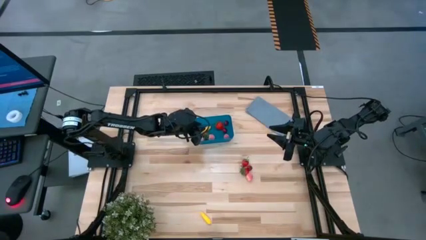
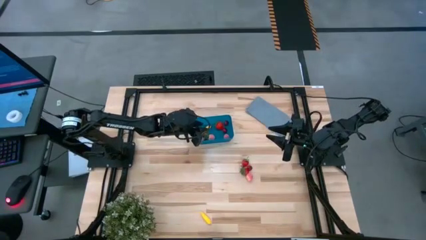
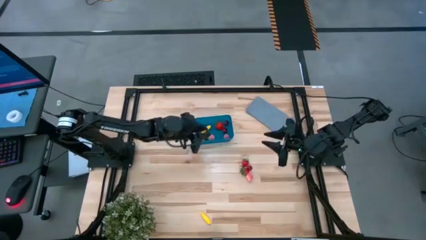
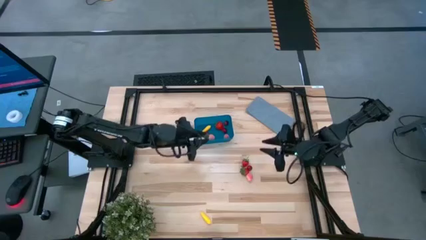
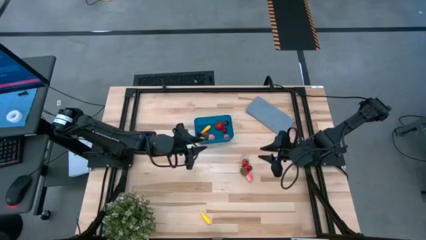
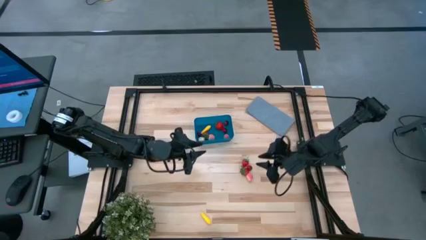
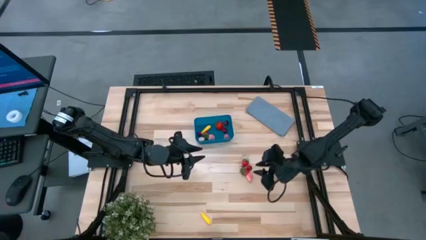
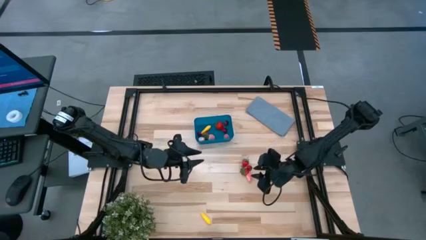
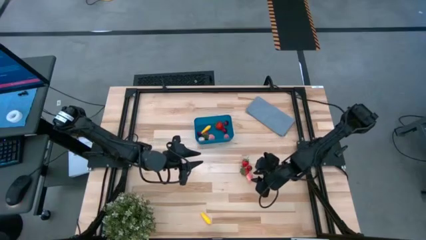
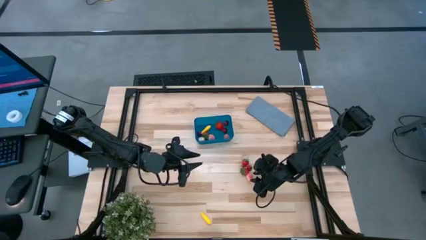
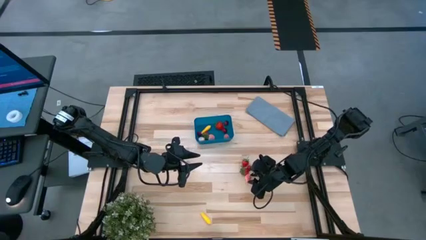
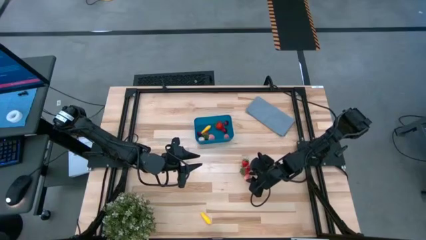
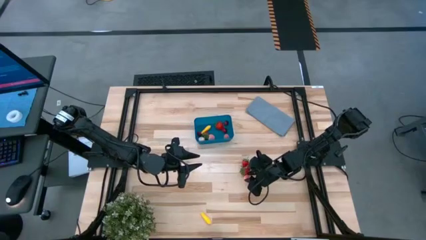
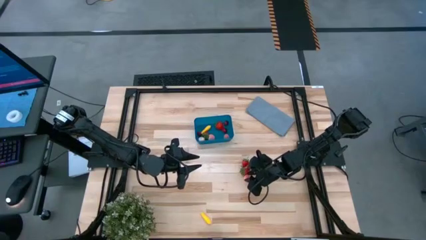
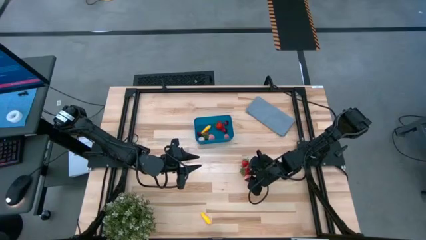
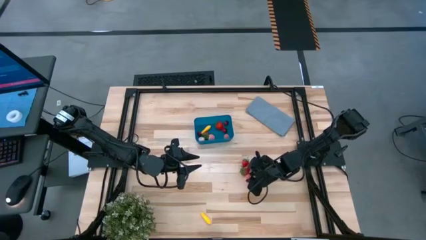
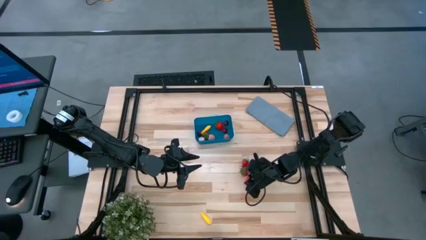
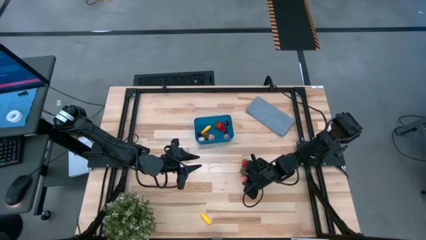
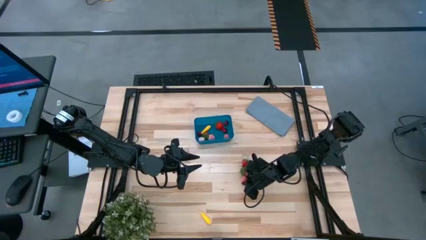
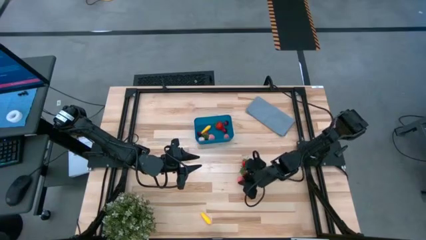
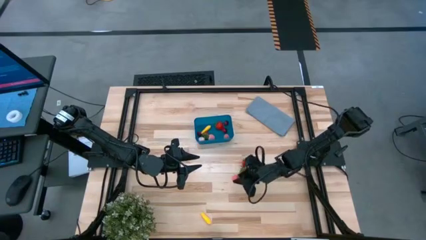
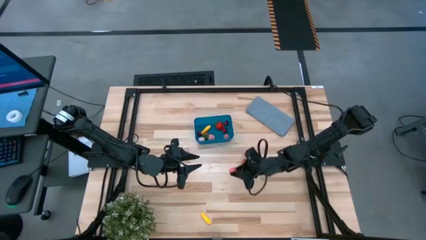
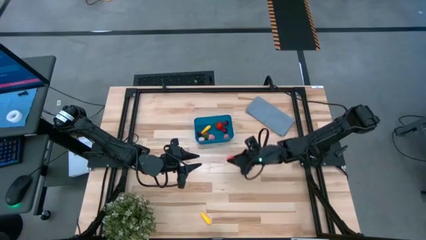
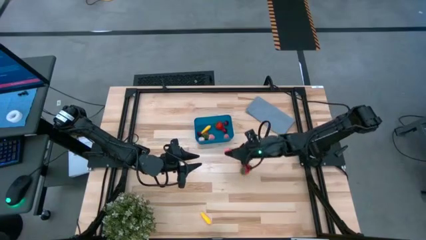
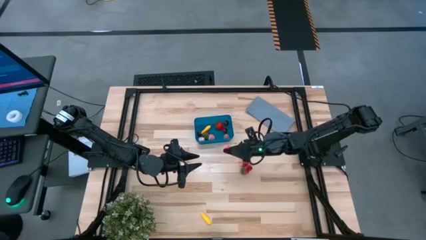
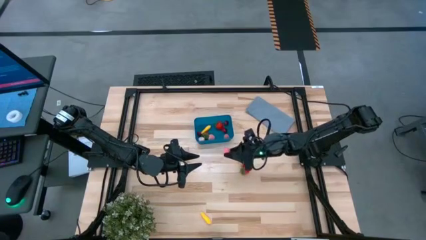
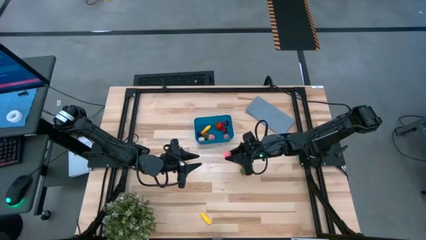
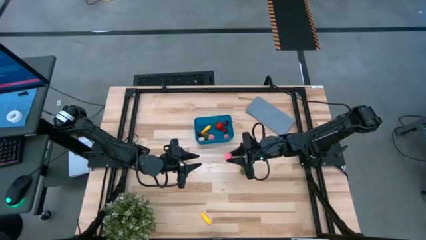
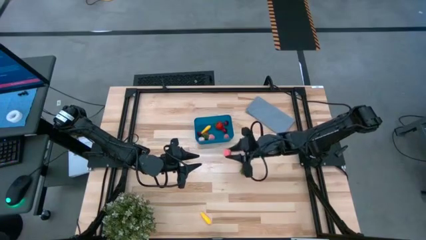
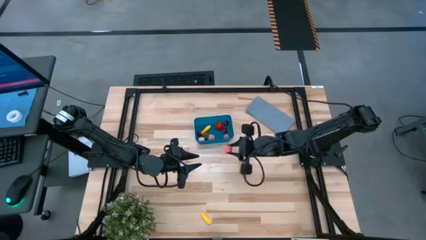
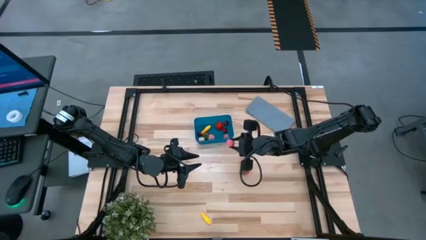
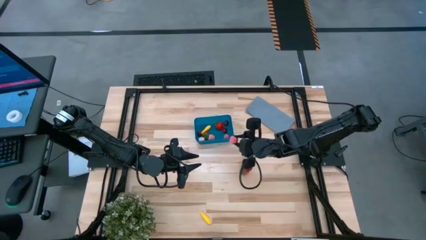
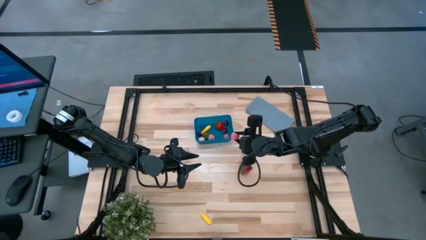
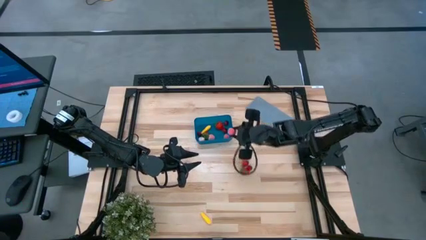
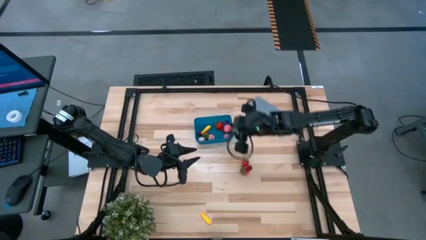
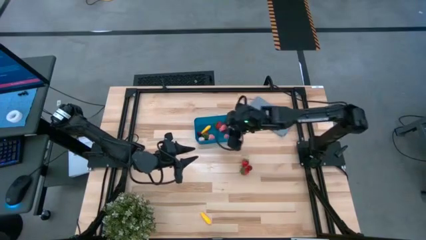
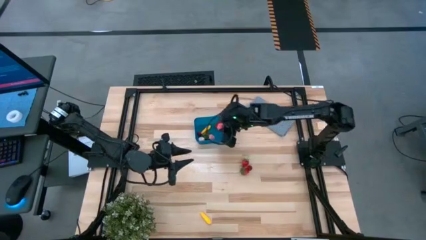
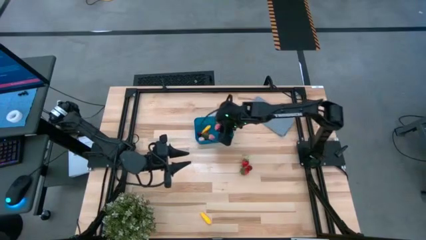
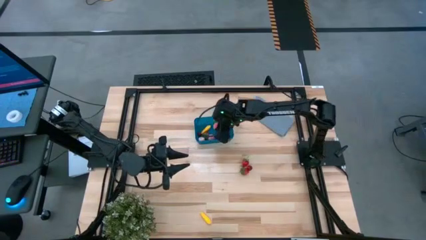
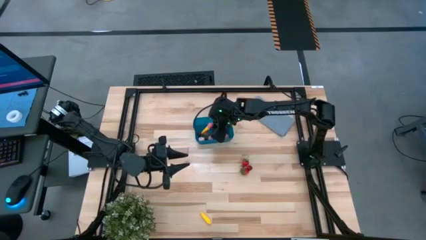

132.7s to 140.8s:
Task: Pick and placing Produce into tupperware
Put the peach into the blue bin

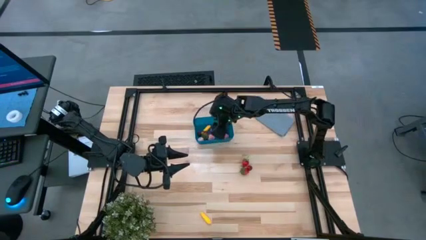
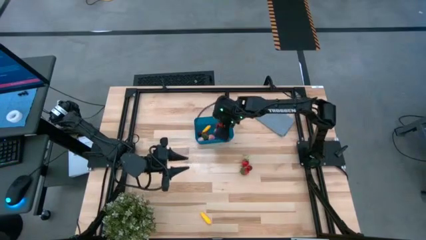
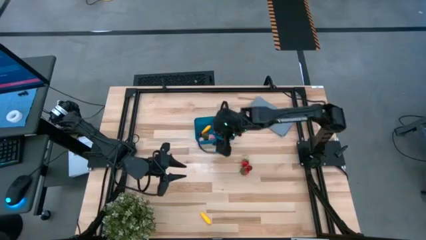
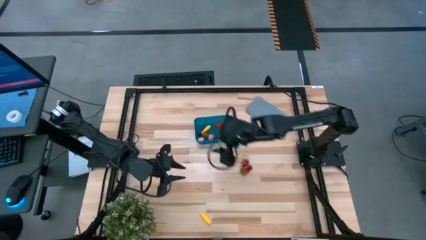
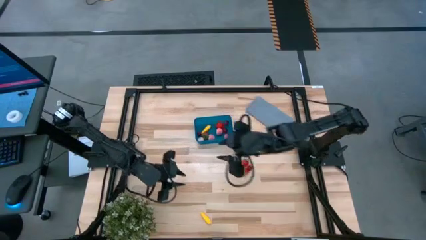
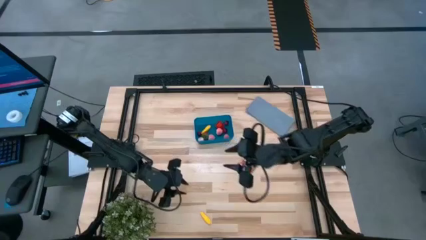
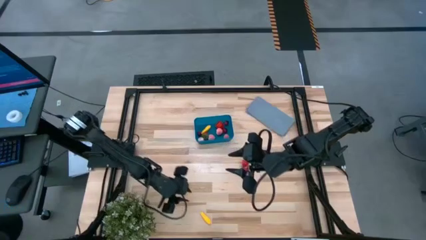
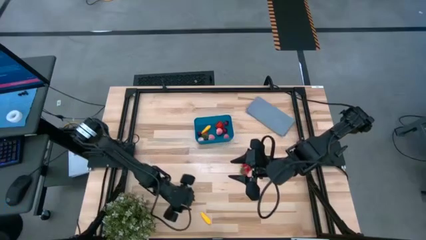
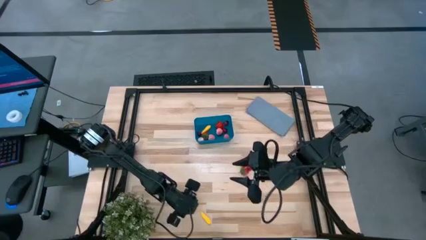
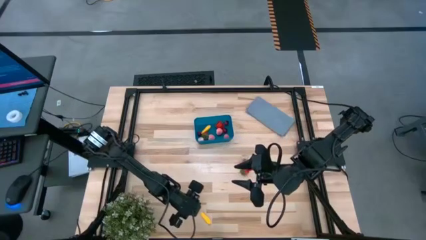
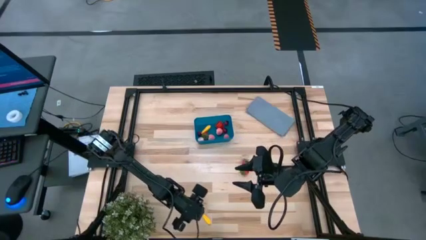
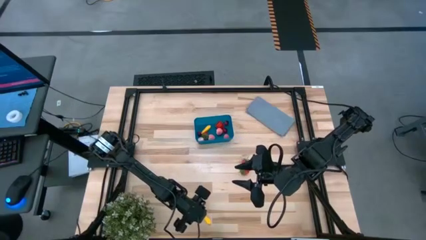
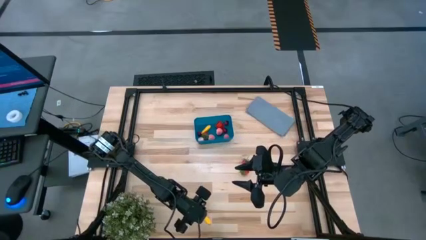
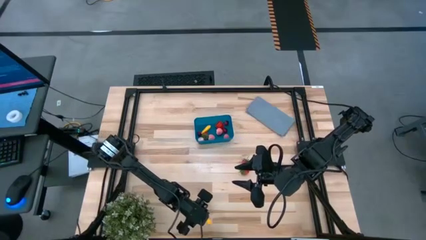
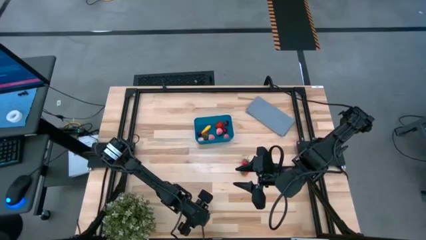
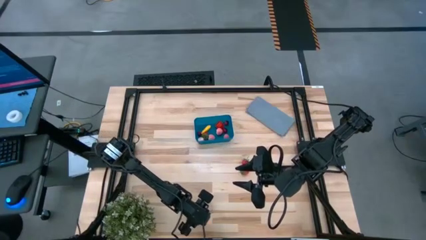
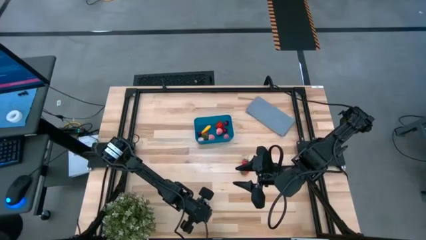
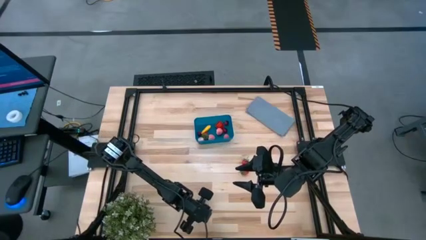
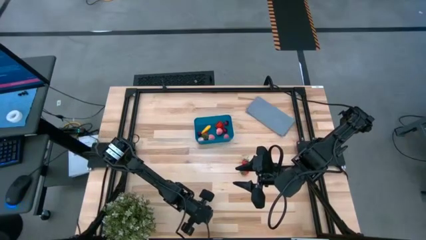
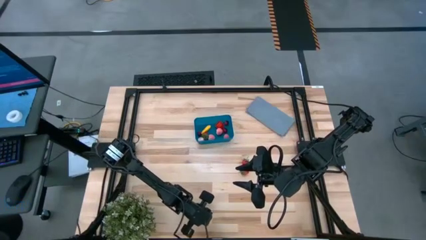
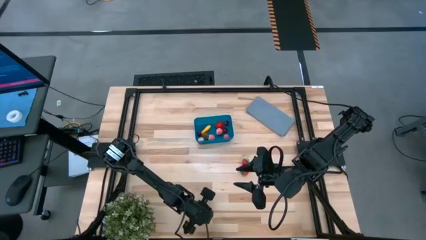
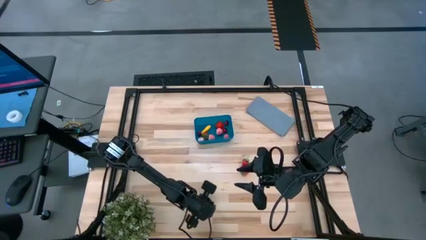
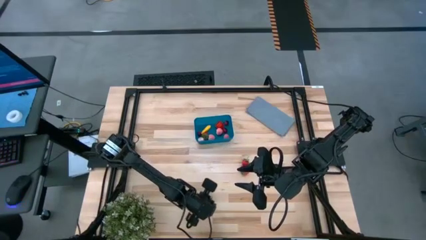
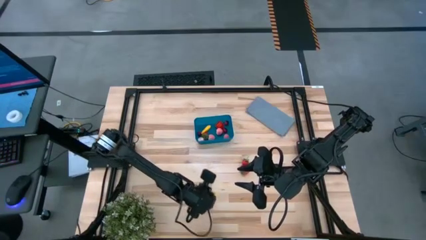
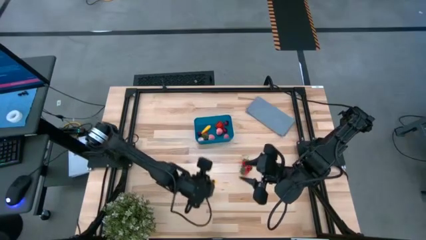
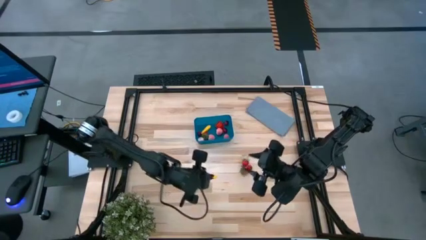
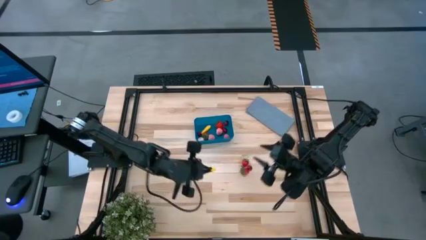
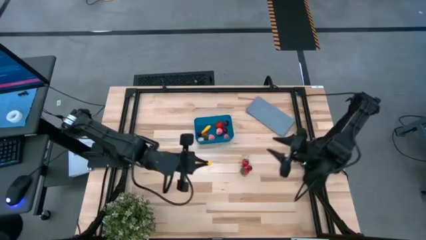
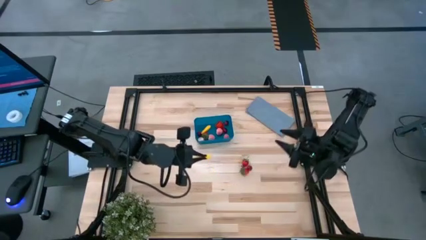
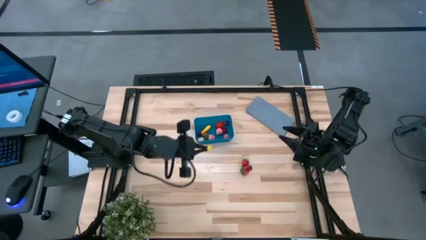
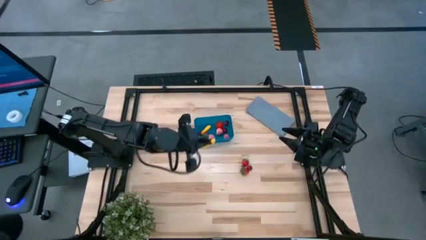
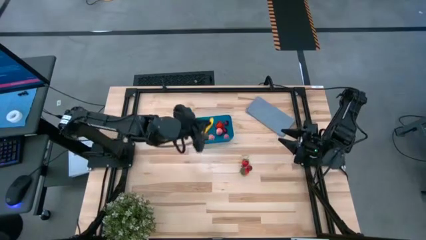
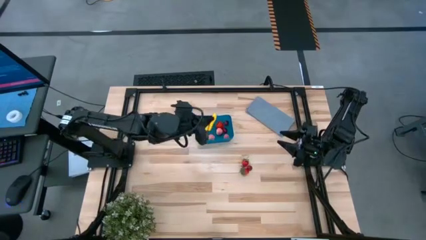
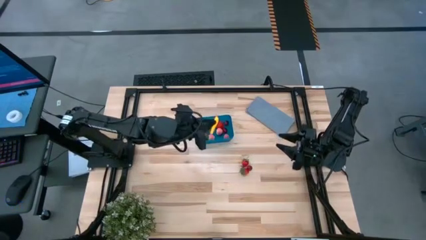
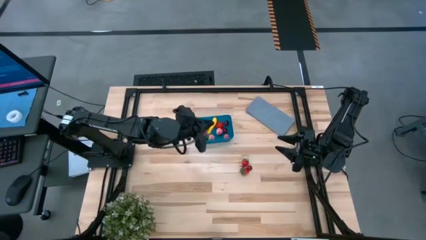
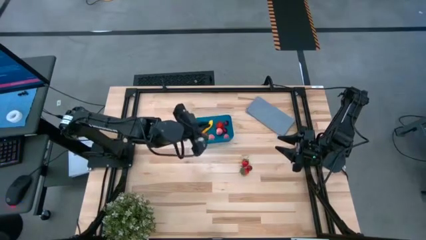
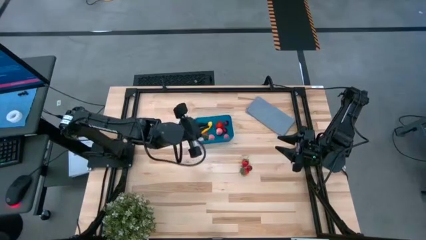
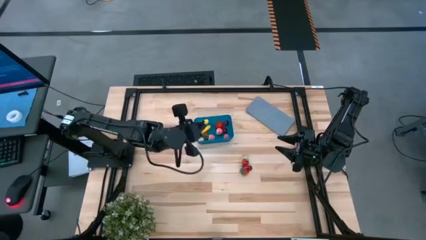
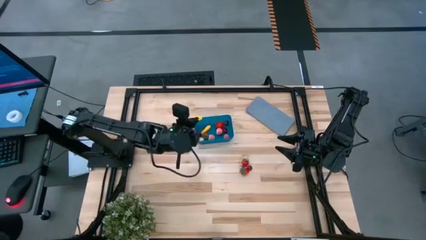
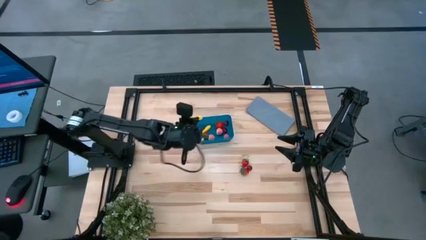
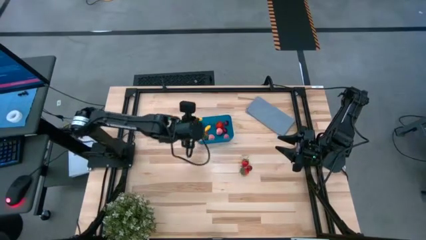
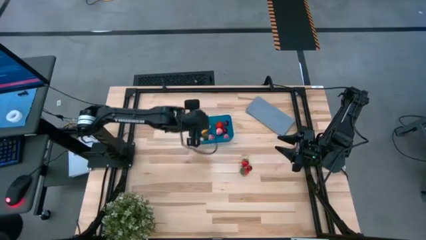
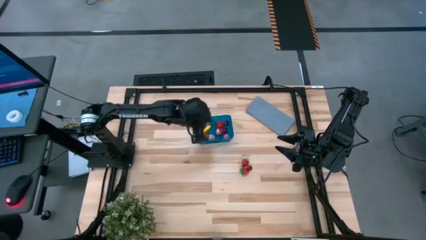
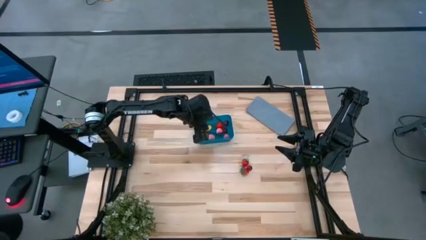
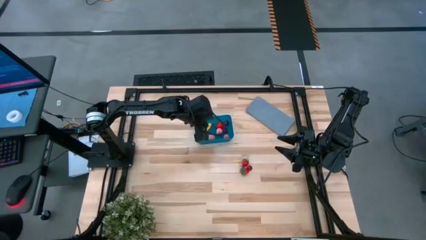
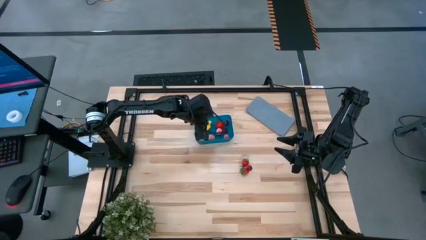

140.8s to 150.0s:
Put the yellow corn into the blue bin
